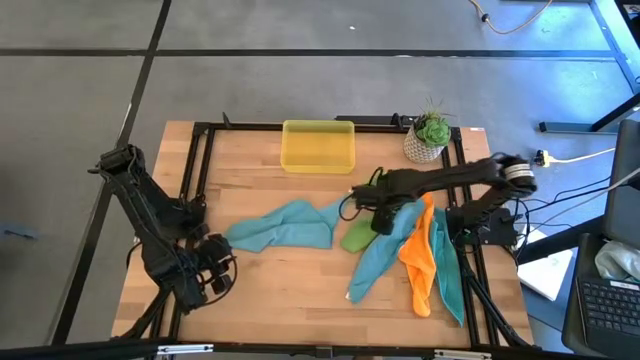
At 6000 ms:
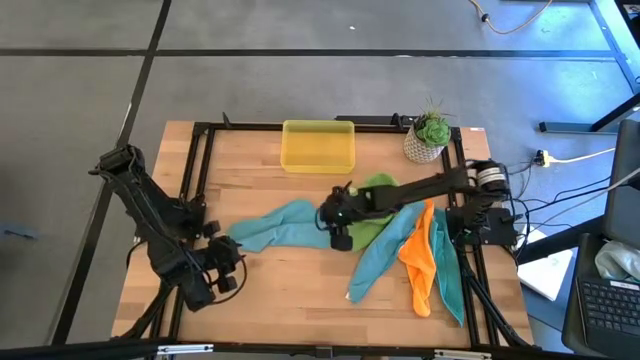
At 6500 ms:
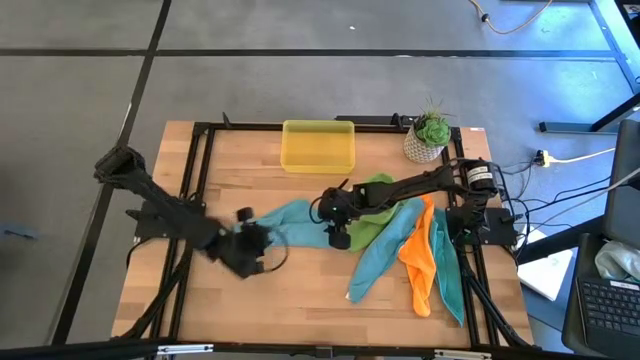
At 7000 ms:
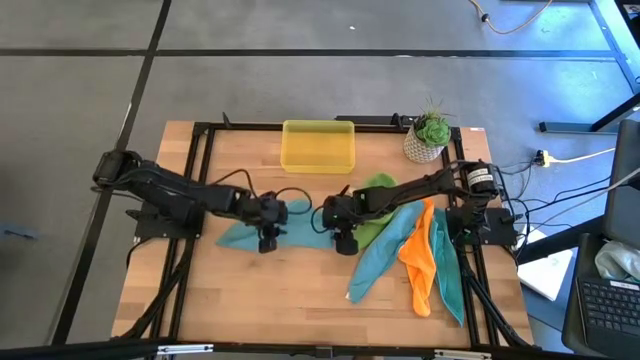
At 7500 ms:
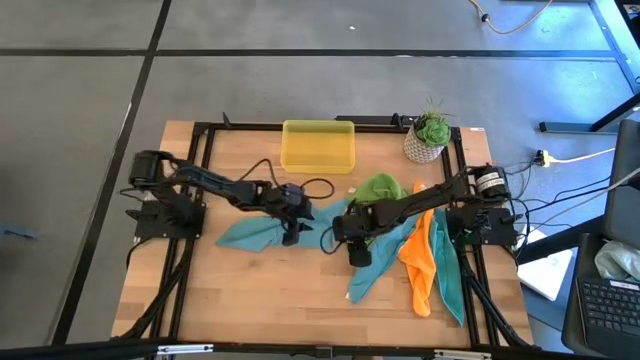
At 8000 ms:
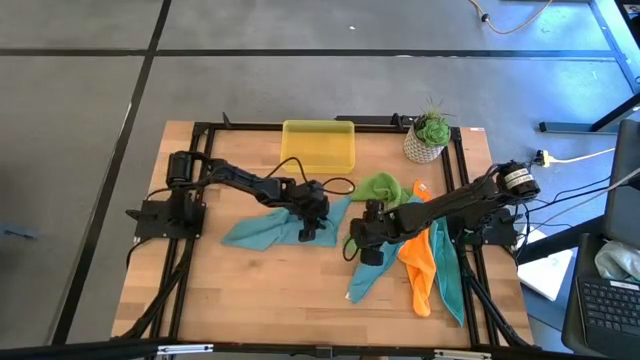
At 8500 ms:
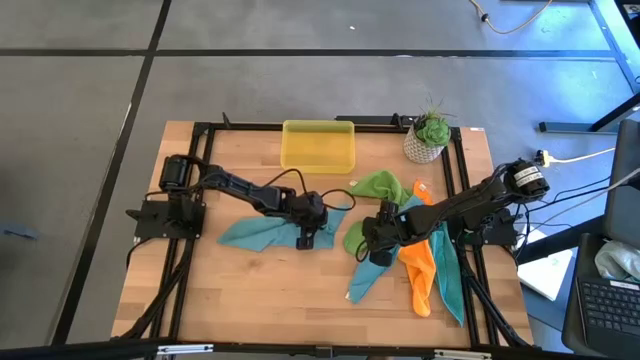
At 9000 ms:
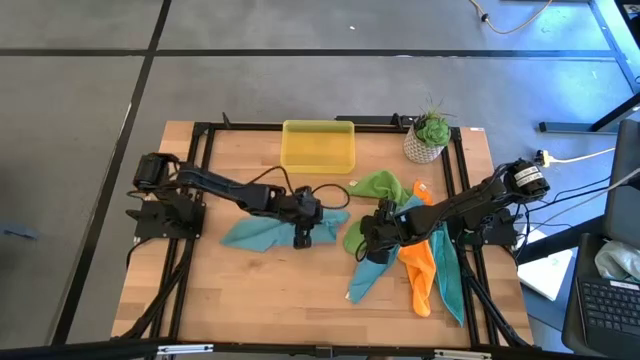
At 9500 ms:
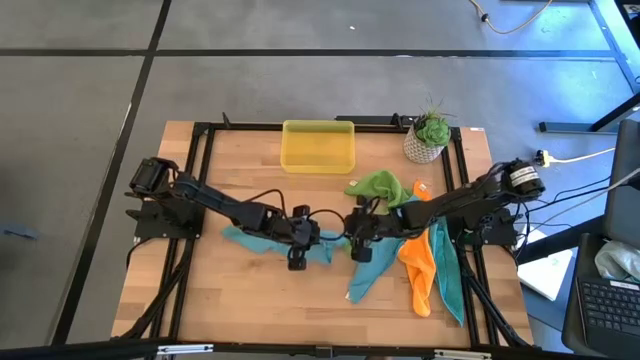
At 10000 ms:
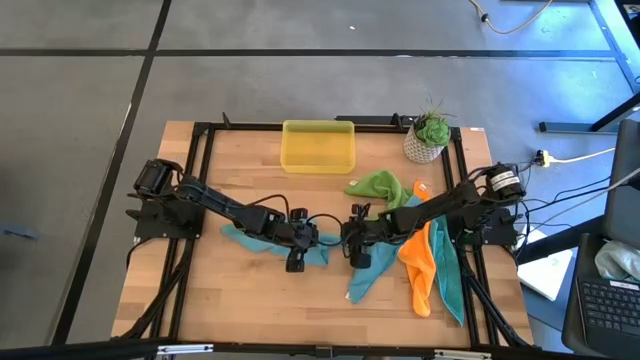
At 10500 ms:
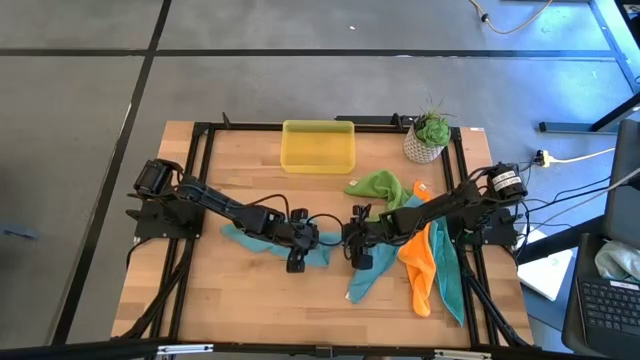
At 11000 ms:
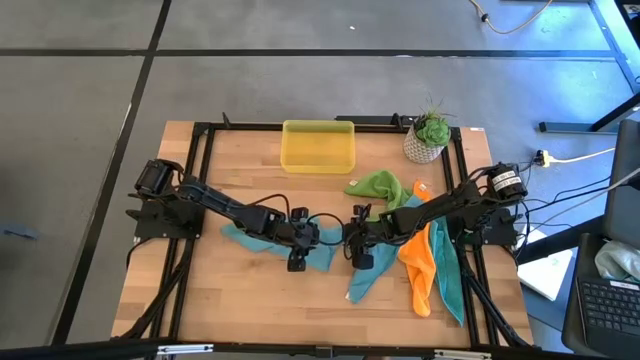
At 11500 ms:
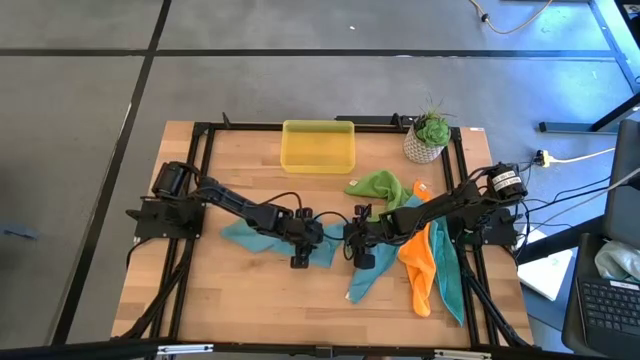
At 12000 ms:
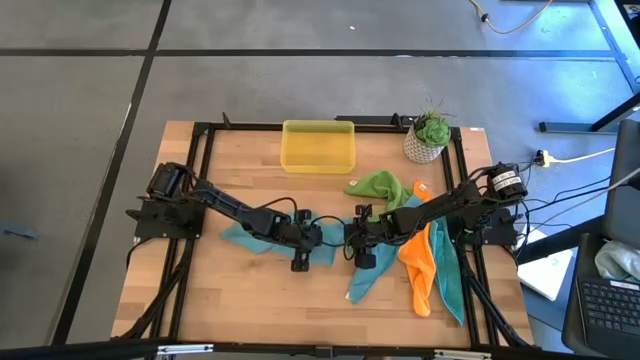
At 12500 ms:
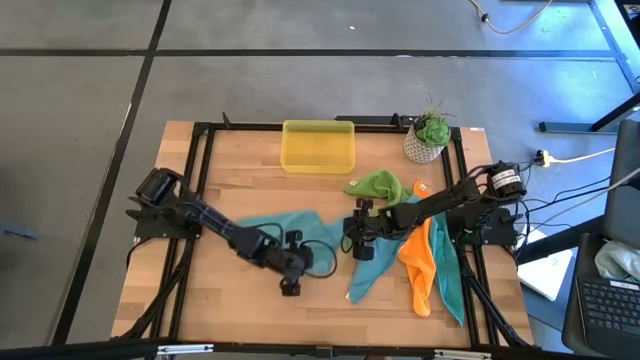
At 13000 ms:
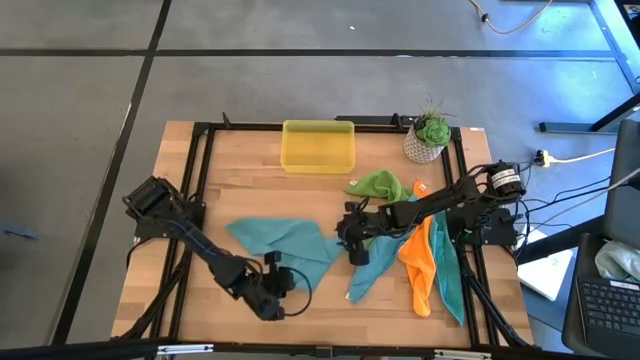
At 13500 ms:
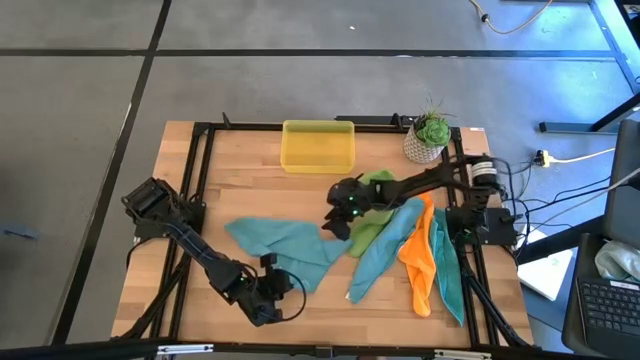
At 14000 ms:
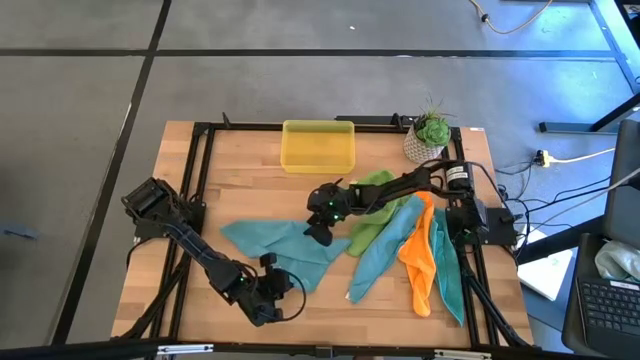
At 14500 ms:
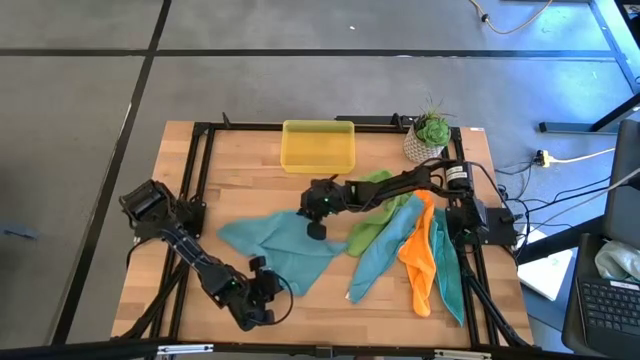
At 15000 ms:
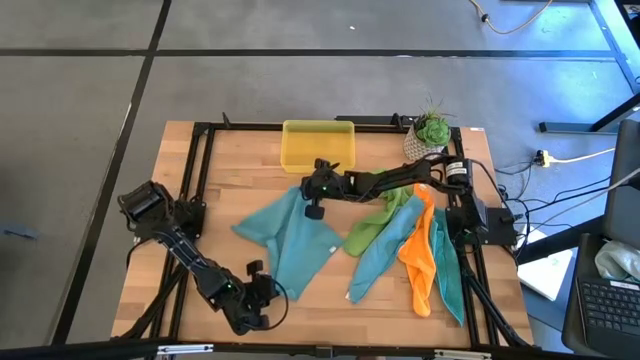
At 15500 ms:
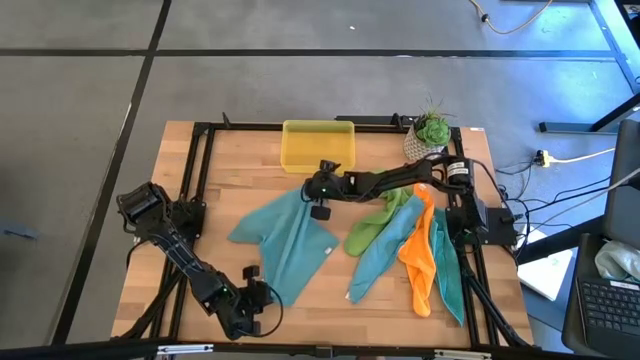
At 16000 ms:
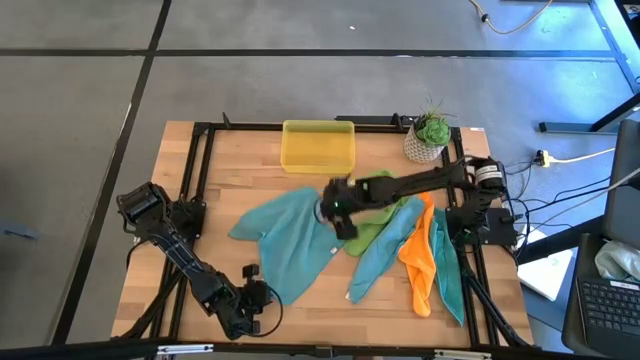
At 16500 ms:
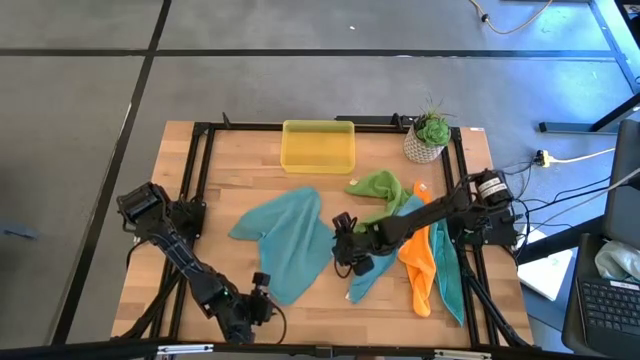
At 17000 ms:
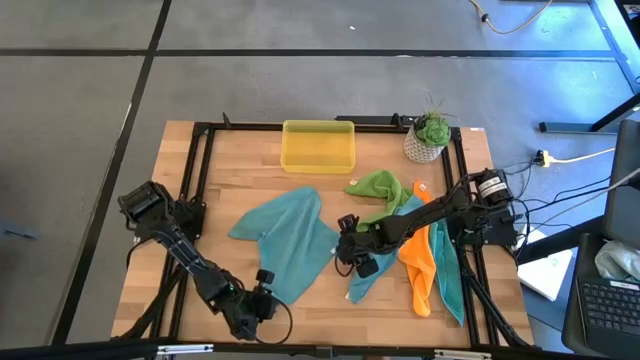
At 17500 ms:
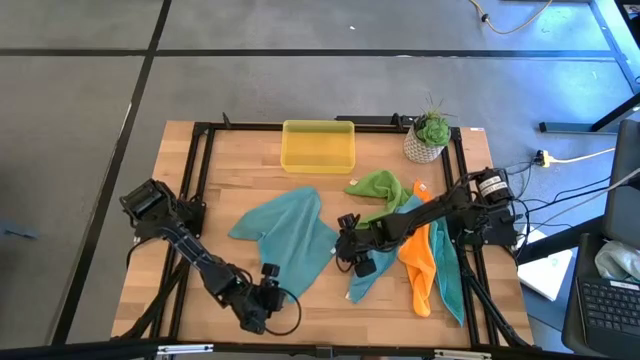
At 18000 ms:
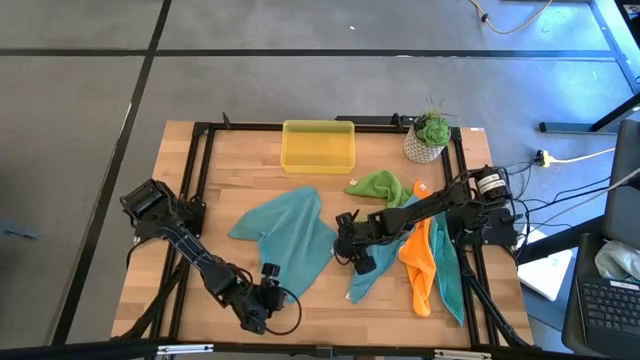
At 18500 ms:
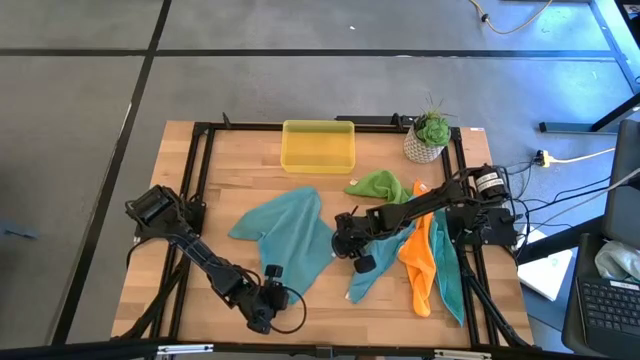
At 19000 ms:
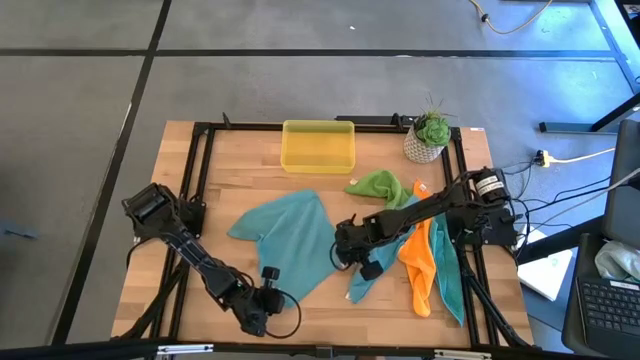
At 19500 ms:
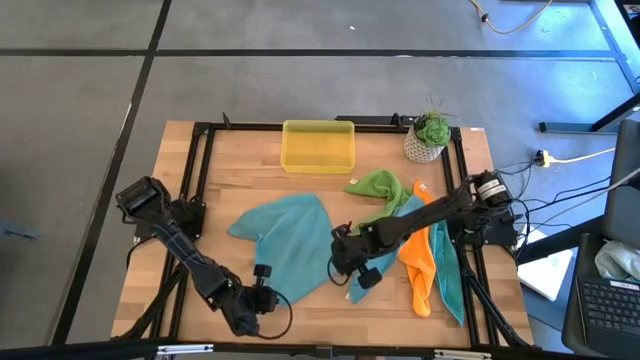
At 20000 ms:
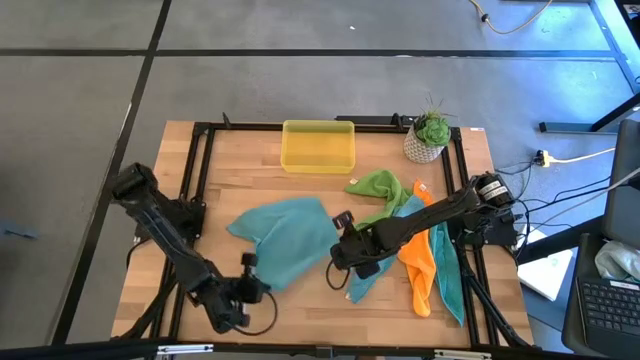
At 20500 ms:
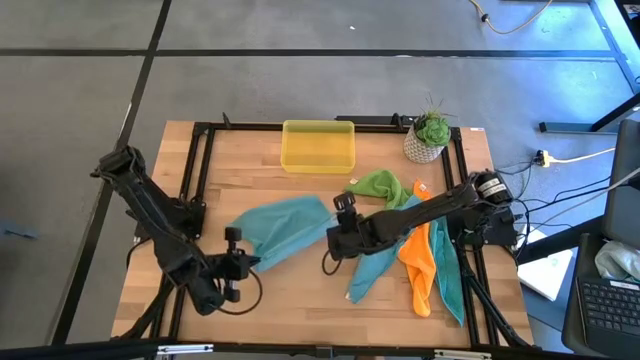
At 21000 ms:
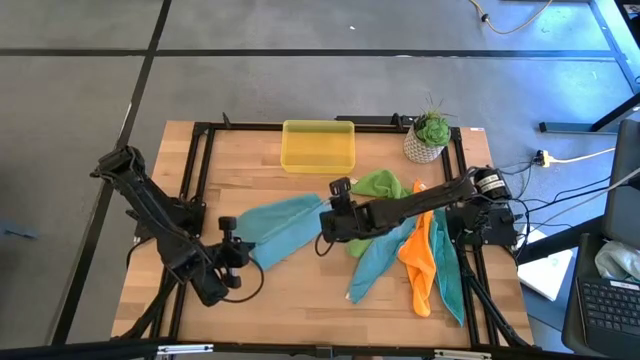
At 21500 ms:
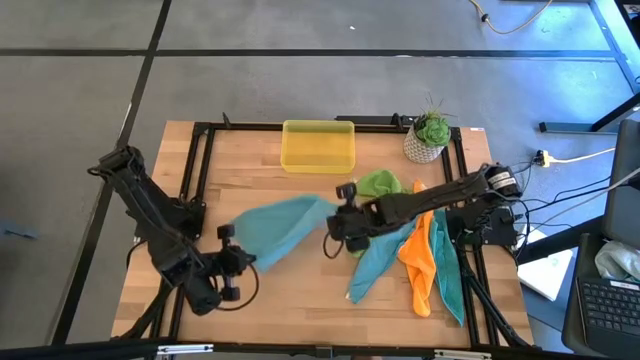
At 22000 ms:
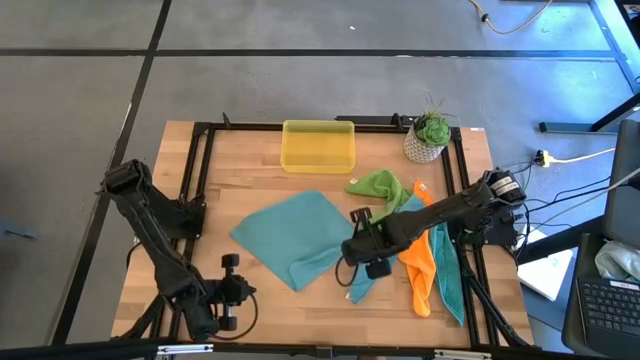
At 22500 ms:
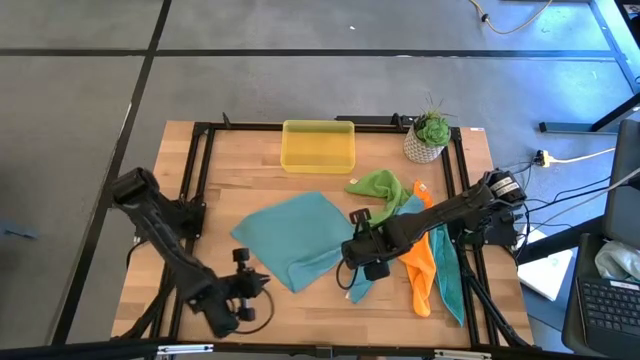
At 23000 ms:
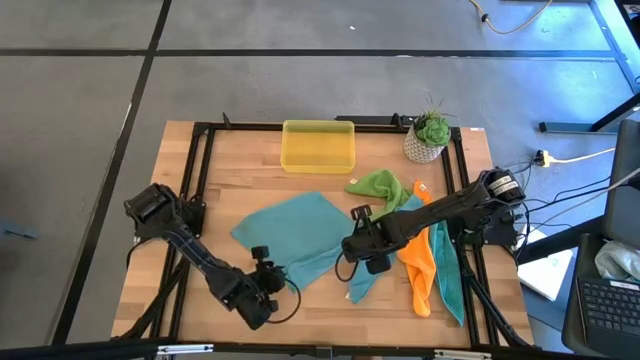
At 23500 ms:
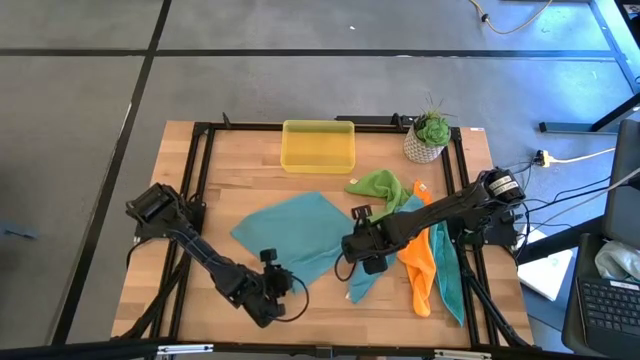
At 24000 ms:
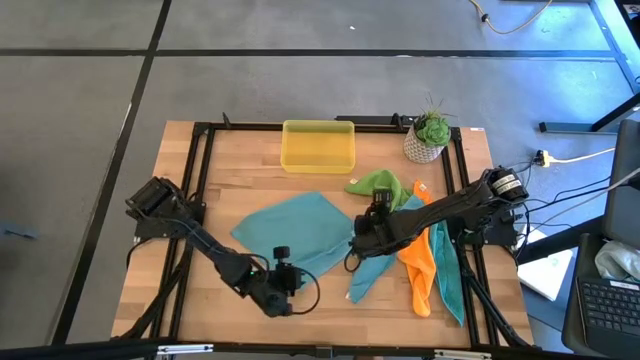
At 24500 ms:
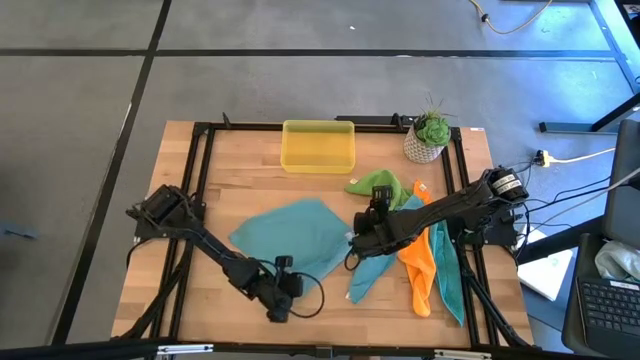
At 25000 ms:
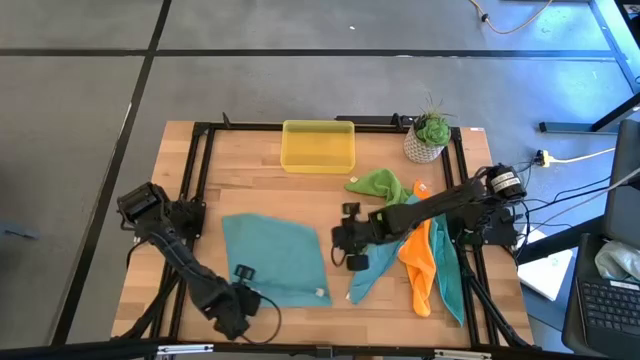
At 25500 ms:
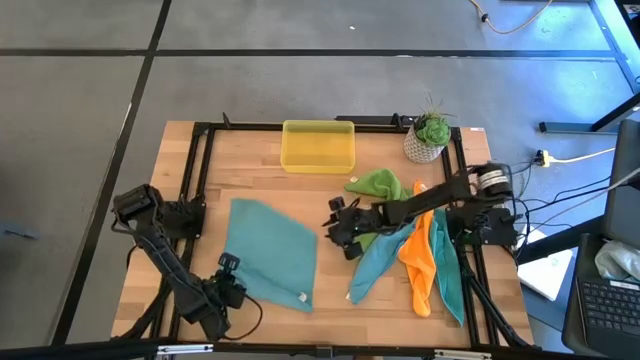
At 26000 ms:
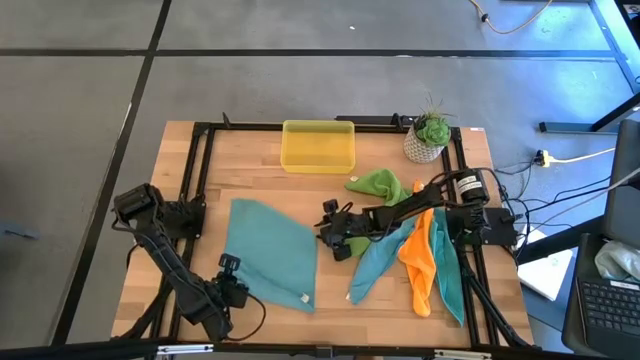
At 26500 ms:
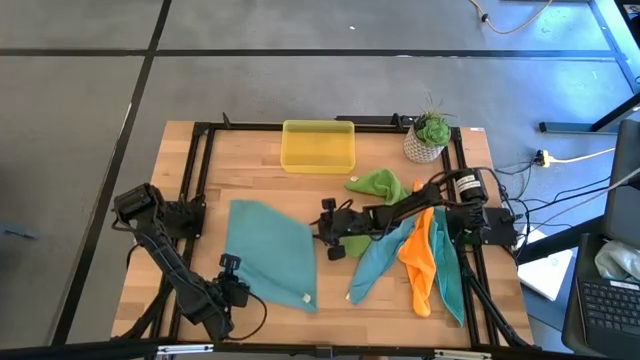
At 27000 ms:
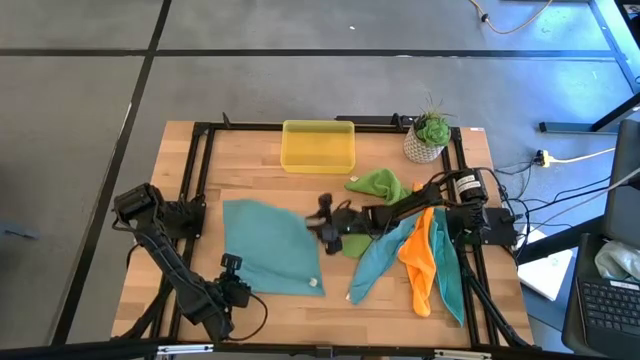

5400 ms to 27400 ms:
Task: Fold microfiber towels
Fold the left blue cloth
